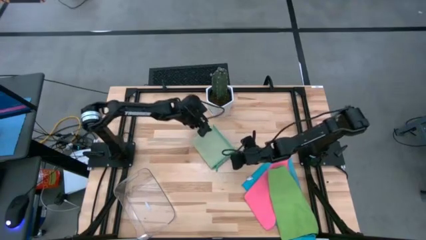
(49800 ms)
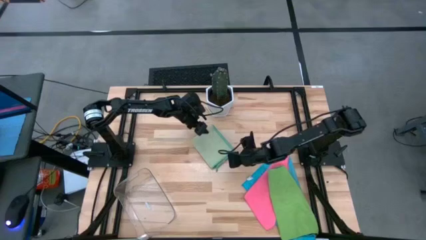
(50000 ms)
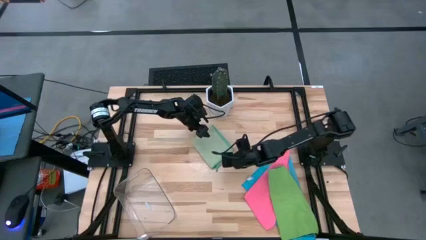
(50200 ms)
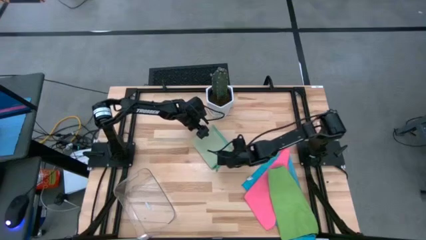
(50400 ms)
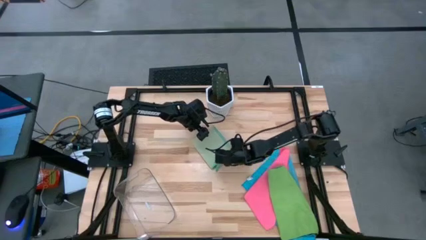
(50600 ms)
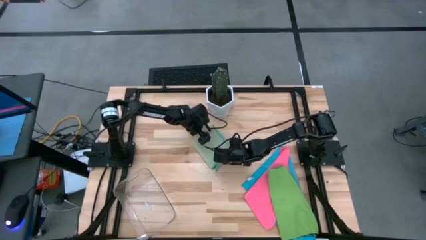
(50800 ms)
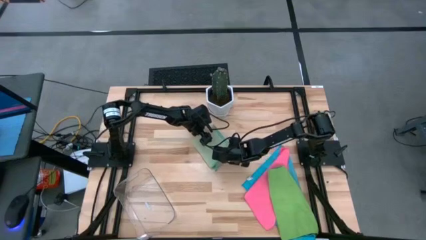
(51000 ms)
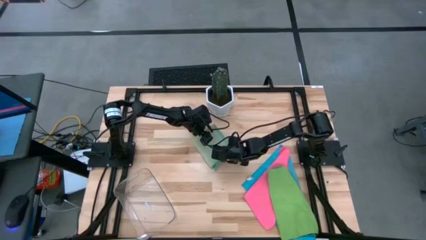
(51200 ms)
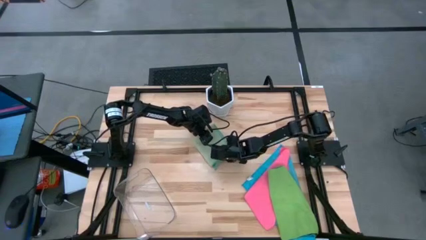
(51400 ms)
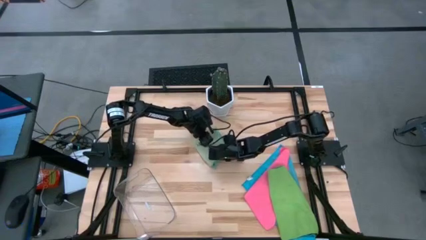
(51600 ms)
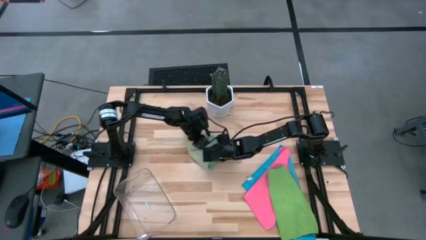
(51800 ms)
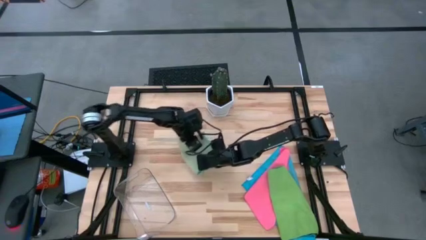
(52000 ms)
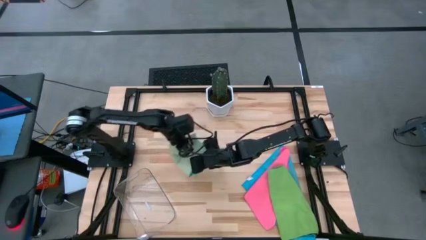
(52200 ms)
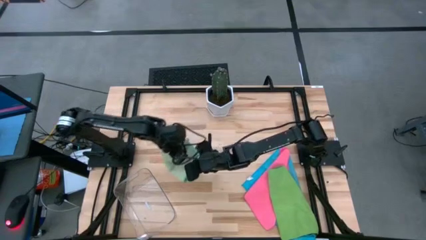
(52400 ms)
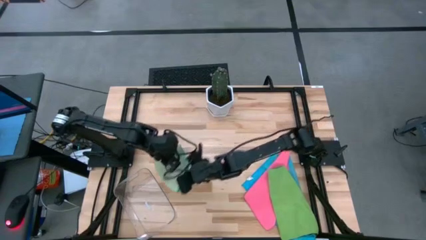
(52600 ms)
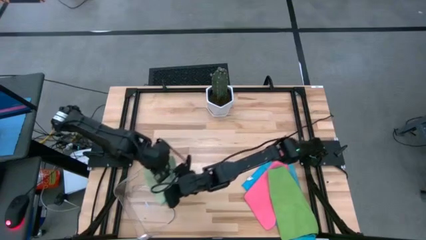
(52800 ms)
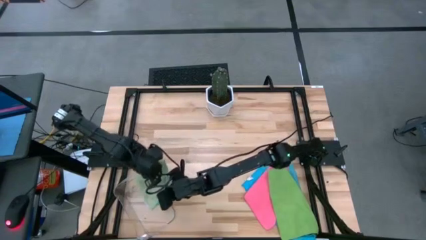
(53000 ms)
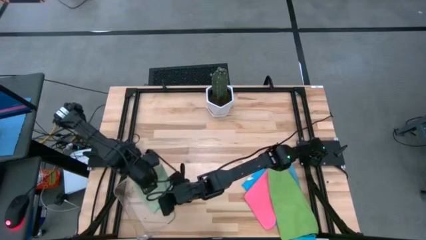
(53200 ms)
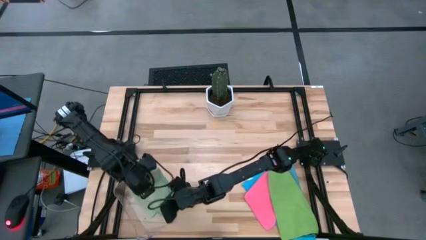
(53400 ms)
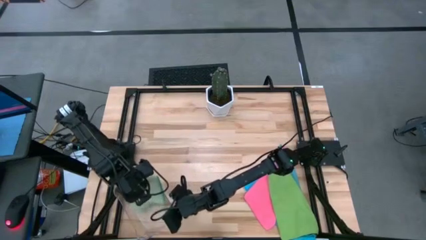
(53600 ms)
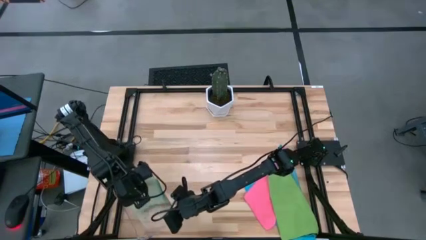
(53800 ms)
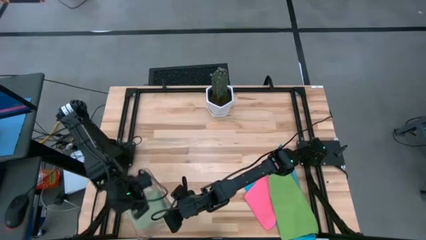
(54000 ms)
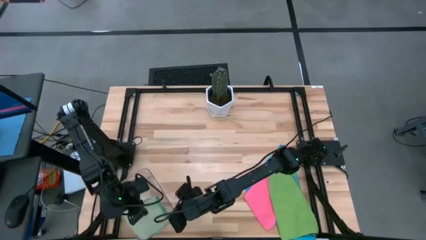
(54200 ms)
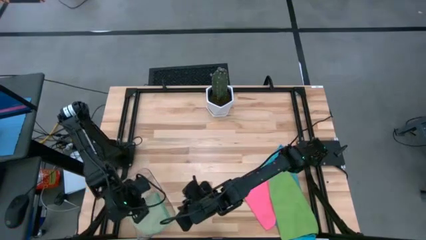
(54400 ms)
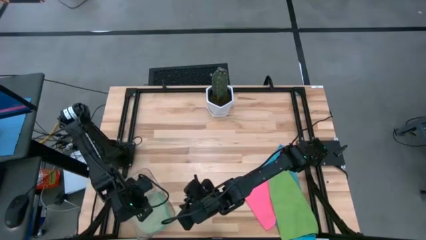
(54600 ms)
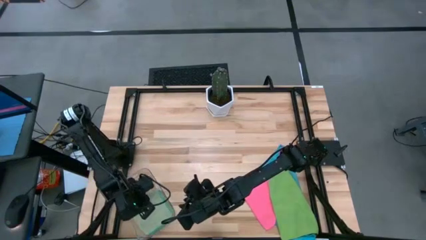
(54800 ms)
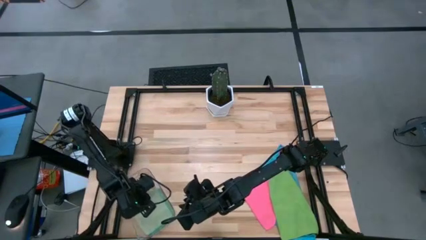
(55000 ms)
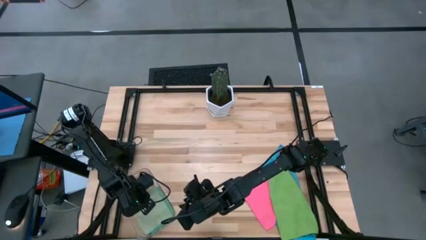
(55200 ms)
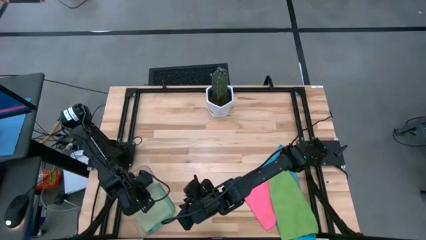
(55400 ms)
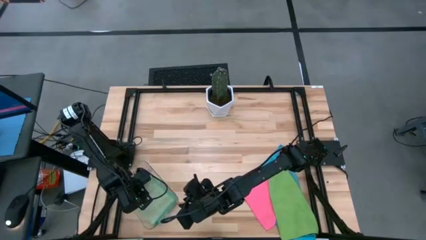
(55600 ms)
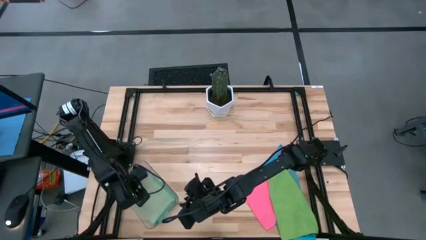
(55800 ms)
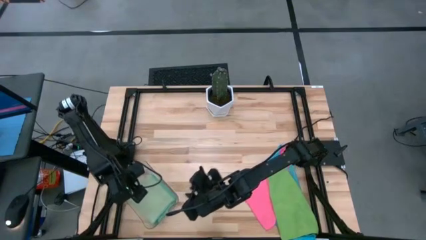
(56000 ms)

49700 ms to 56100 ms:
Task: Fold microfiber towels
Put the folded light green microfiber cloth into the transparent bin

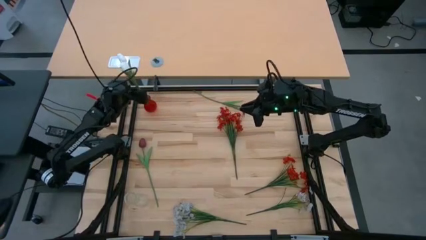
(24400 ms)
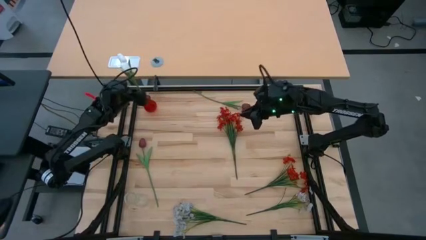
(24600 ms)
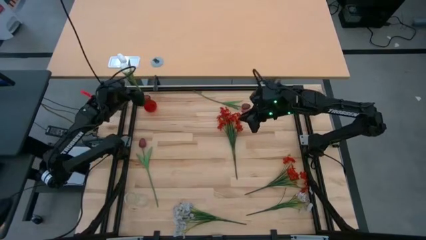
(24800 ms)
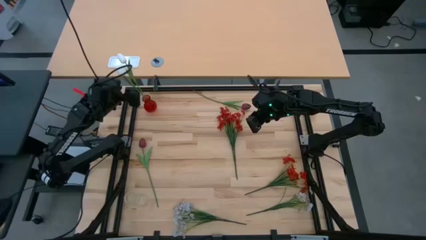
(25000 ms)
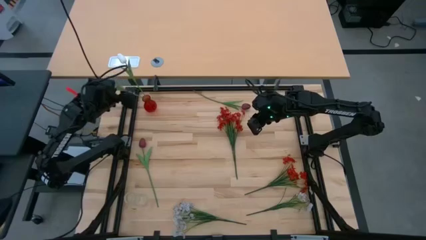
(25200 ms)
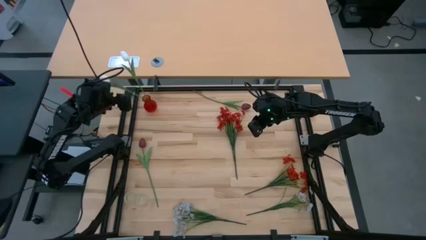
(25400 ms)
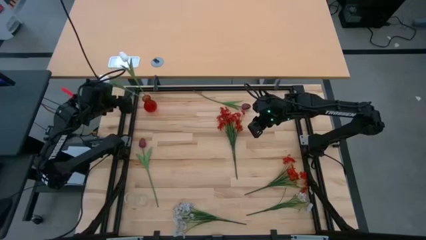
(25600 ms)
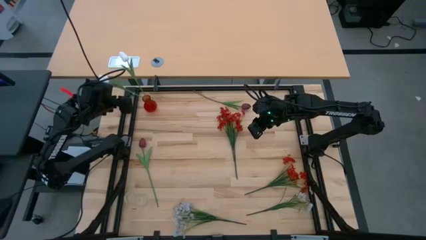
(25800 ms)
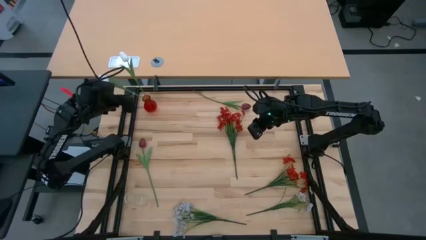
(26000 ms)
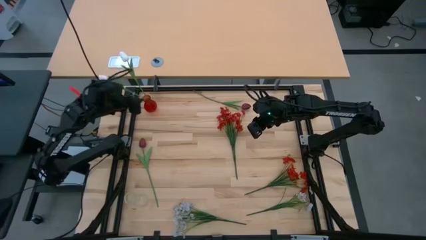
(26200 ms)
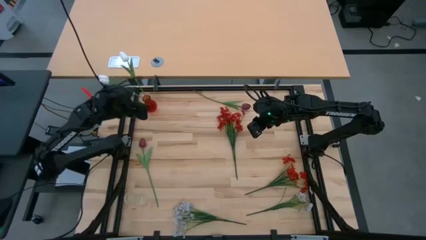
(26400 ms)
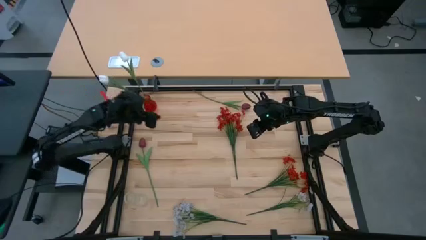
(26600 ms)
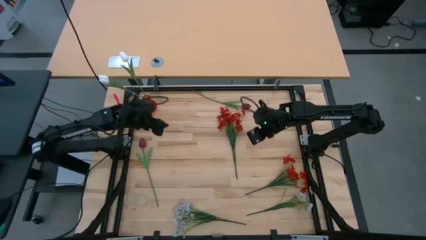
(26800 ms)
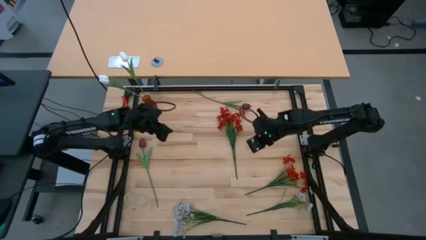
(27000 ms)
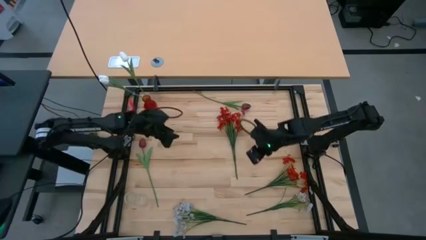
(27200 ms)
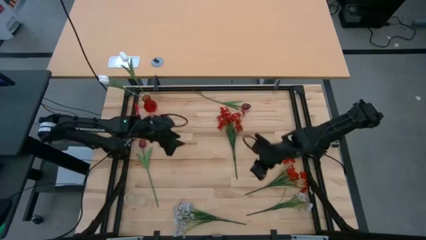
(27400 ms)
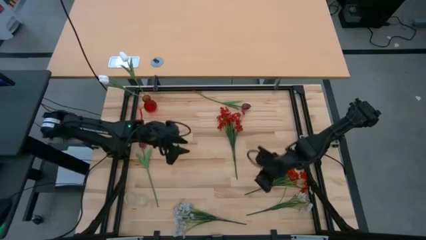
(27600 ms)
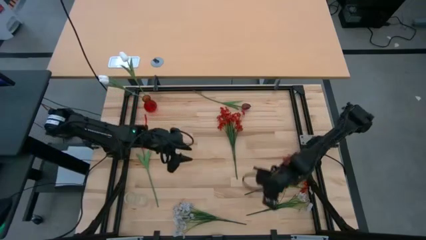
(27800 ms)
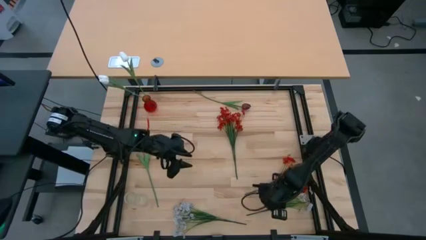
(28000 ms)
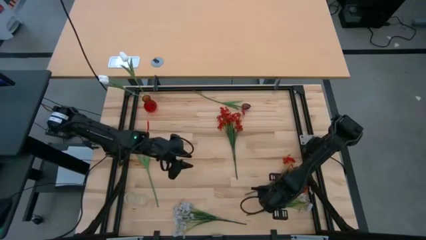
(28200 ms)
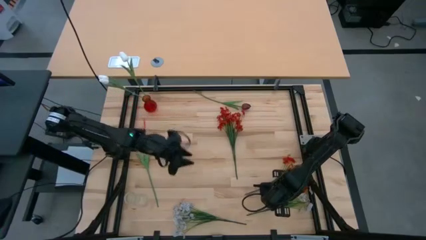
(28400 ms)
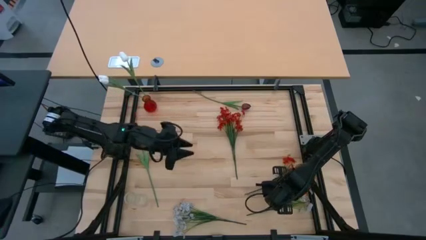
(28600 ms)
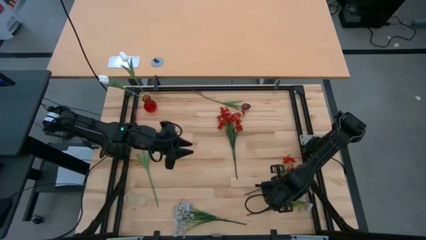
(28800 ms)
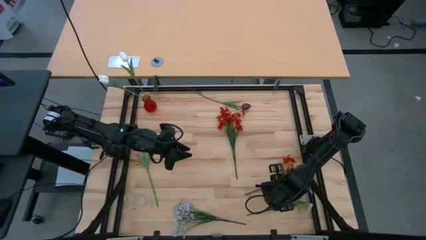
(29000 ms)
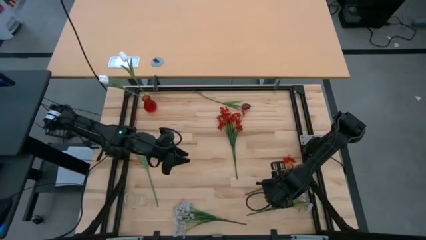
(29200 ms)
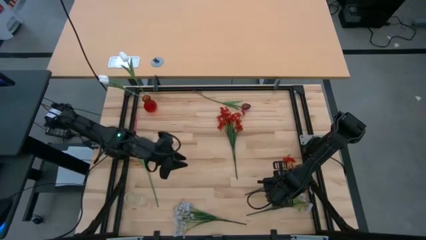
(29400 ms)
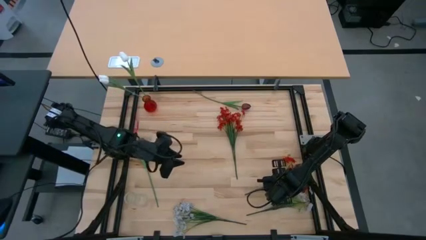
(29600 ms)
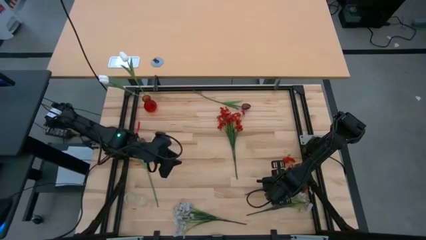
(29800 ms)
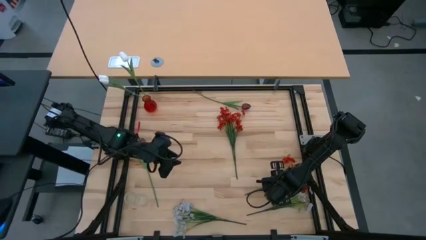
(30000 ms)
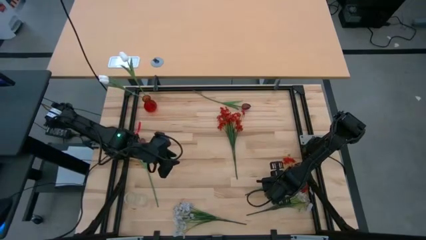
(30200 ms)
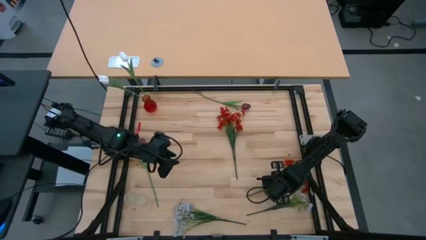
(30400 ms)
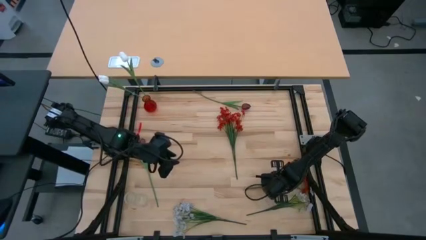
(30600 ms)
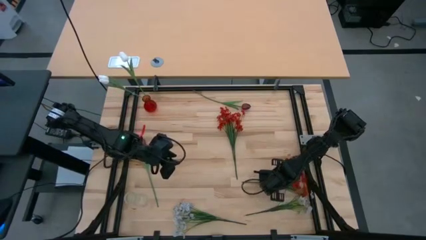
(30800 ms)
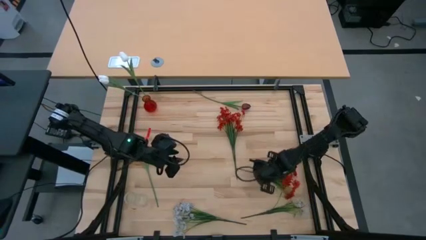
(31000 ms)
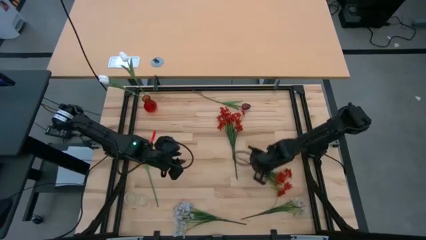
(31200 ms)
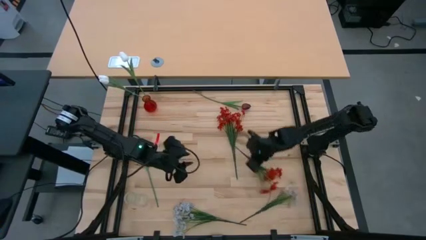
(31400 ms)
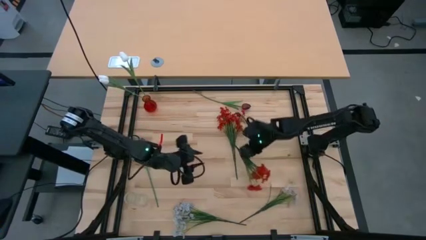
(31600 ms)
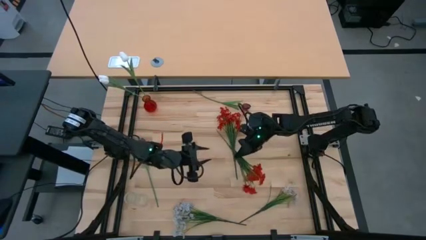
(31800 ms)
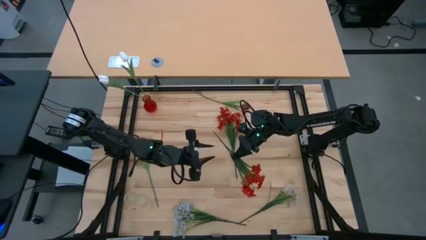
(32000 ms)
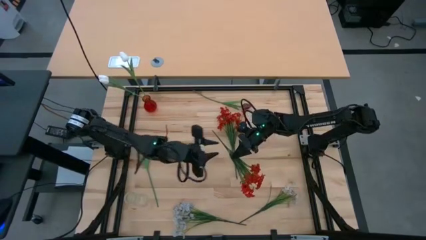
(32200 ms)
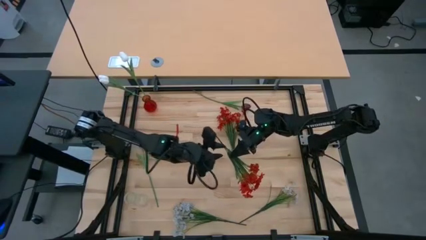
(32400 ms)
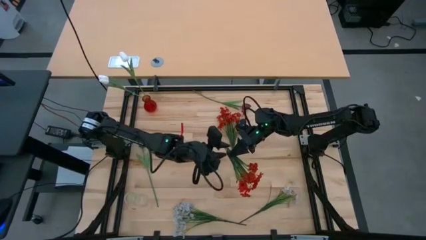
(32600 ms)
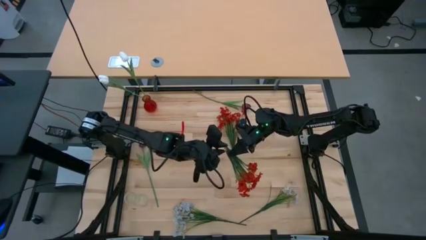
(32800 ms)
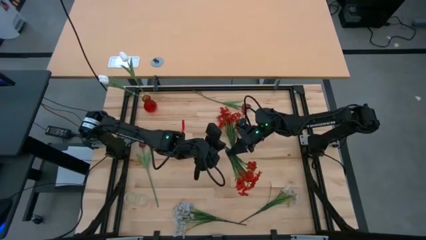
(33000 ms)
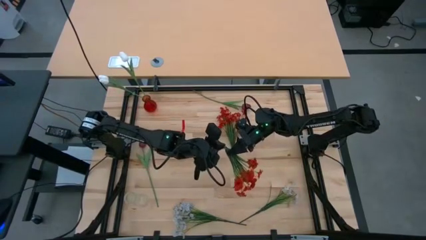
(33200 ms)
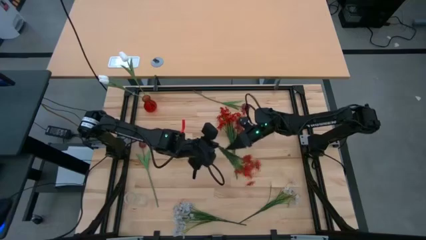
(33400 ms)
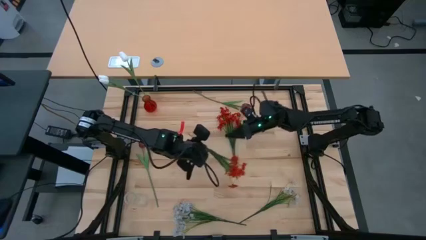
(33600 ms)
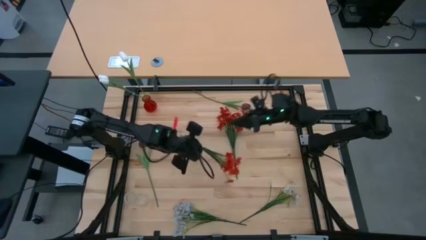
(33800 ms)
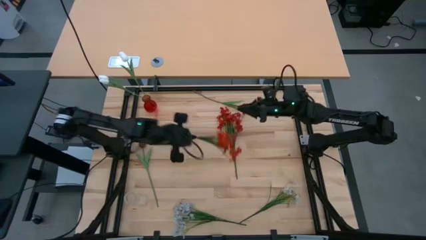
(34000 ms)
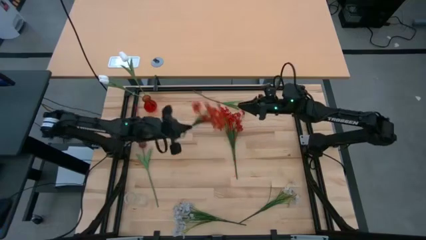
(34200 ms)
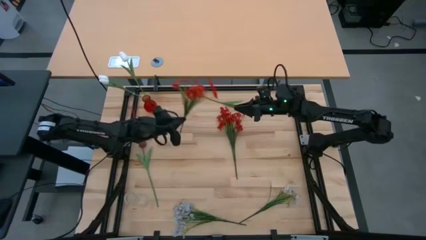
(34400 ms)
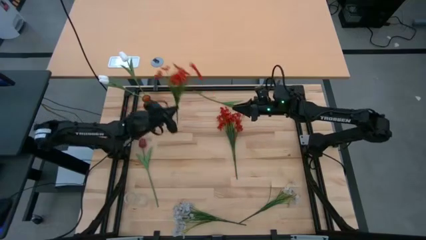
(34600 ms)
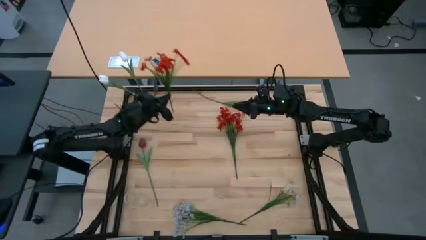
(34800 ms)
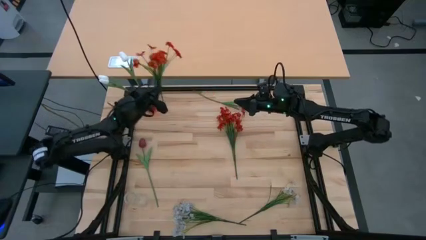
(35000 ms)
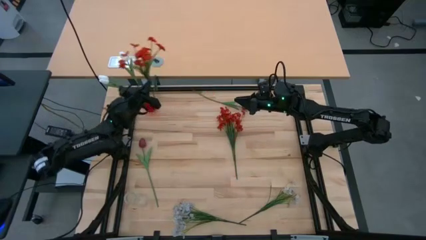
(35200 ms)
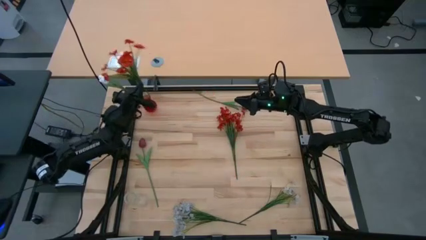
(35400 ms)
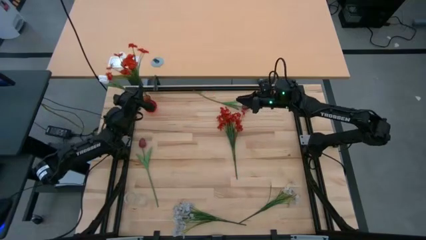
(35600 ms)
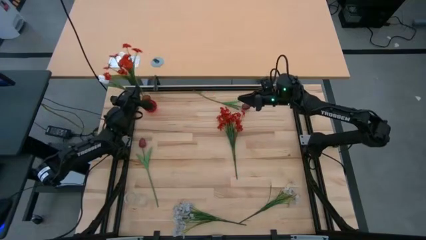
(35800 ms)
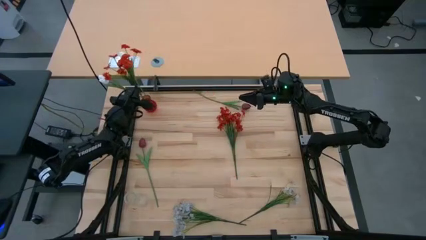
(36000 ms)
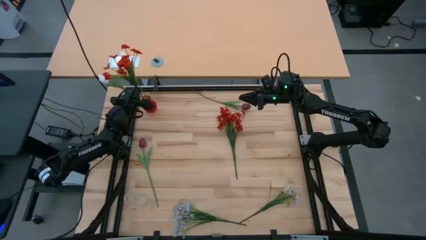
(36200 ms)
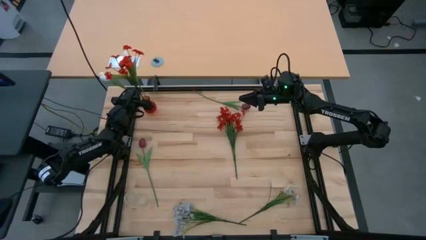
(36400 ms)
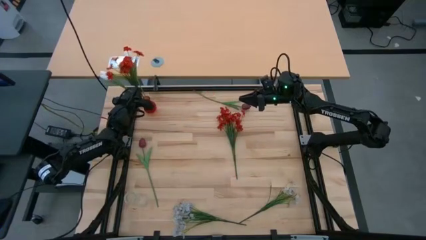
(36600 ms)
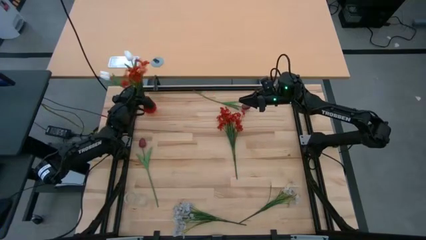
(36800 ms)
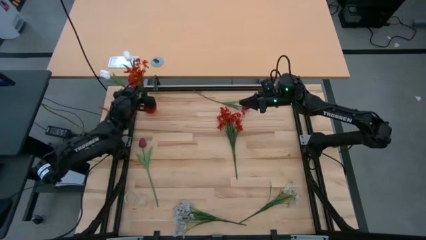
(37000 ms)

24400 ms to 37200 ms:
Task: Sort flowers into vase by color
Put the bottom red flowers into the red vase
